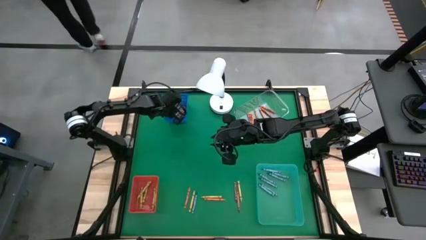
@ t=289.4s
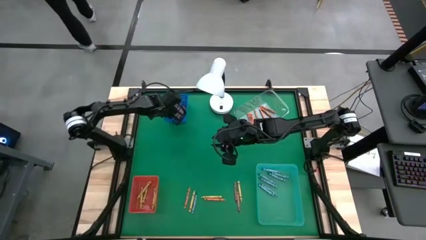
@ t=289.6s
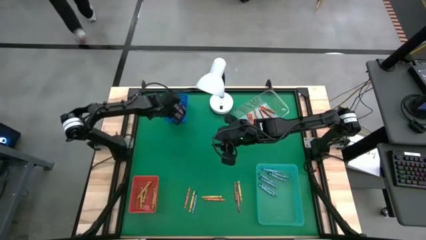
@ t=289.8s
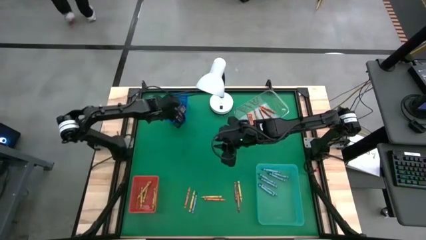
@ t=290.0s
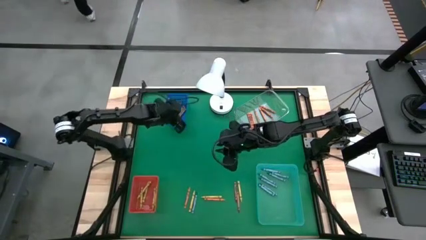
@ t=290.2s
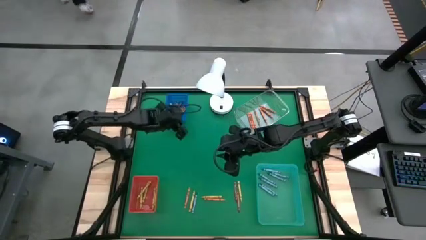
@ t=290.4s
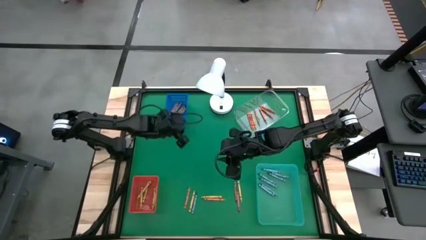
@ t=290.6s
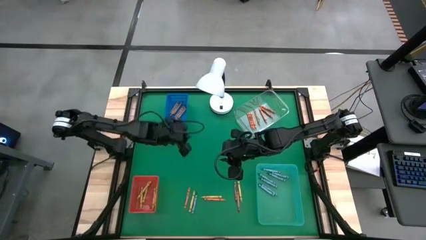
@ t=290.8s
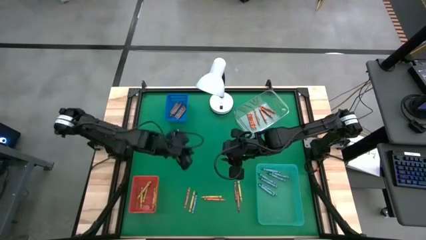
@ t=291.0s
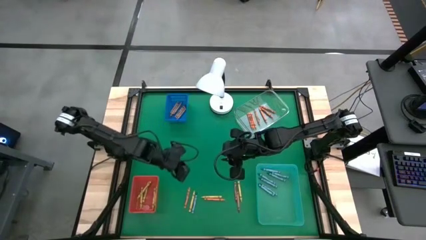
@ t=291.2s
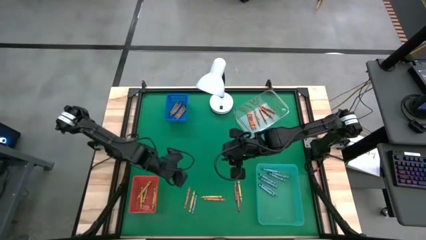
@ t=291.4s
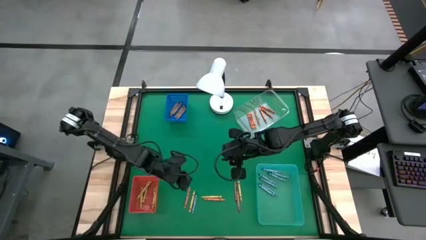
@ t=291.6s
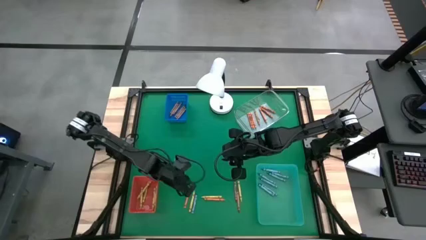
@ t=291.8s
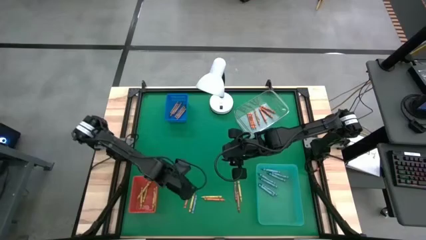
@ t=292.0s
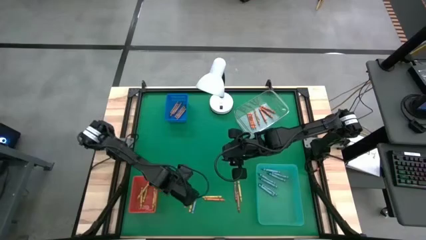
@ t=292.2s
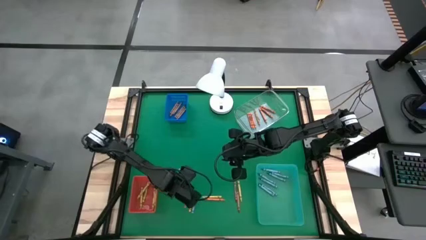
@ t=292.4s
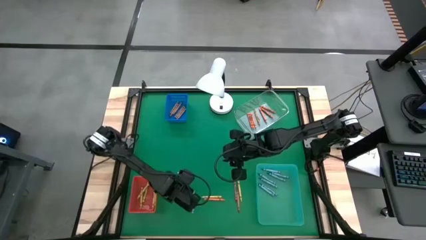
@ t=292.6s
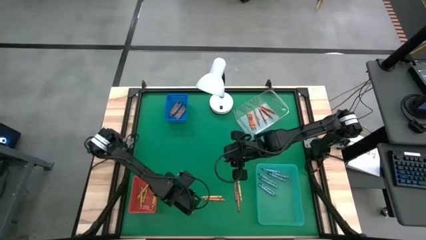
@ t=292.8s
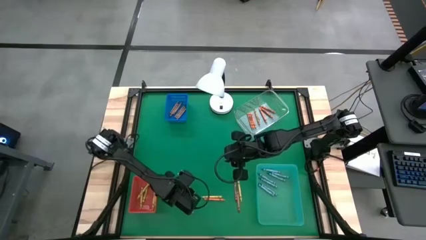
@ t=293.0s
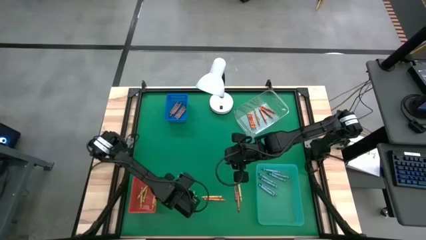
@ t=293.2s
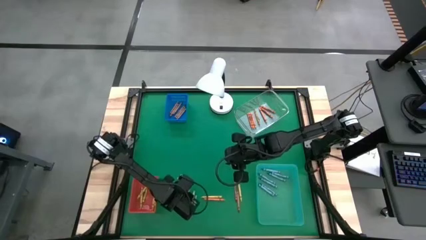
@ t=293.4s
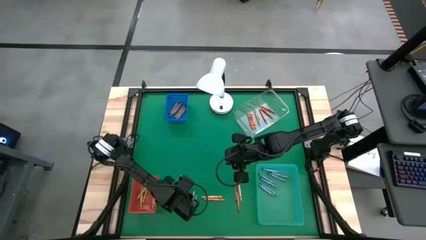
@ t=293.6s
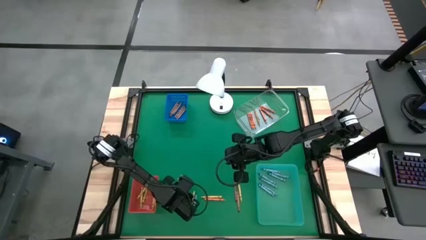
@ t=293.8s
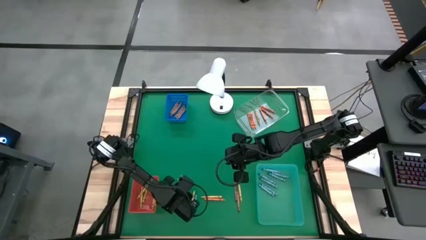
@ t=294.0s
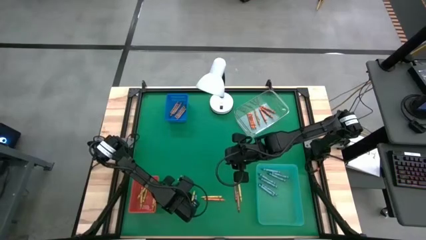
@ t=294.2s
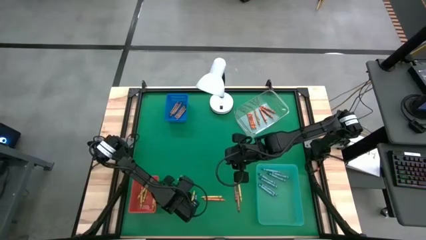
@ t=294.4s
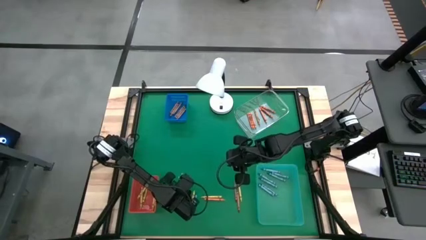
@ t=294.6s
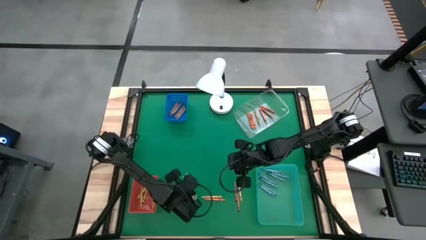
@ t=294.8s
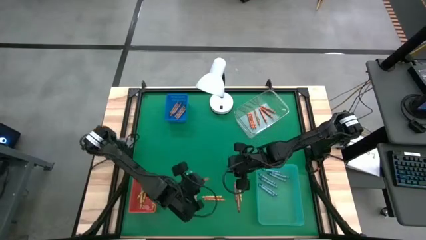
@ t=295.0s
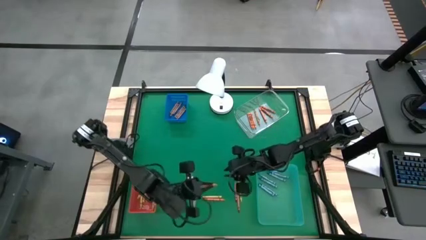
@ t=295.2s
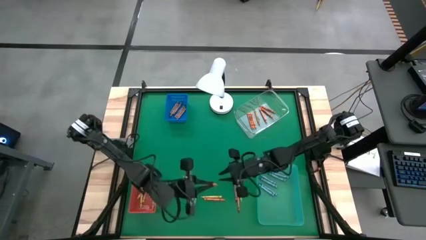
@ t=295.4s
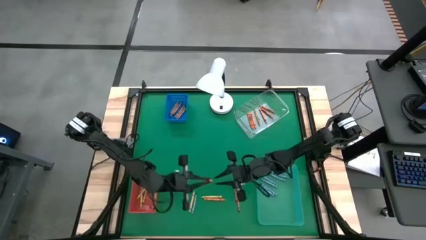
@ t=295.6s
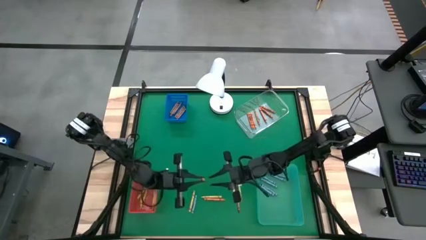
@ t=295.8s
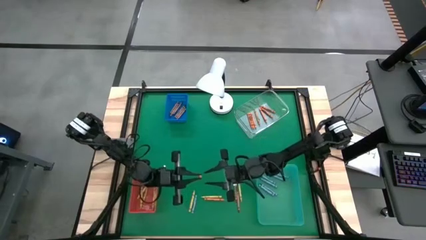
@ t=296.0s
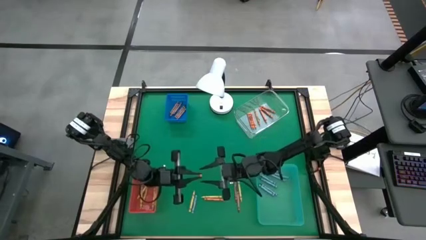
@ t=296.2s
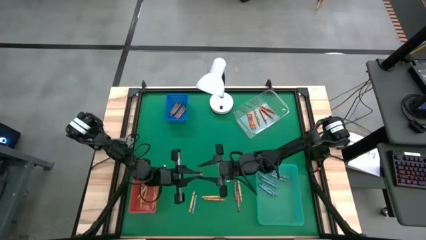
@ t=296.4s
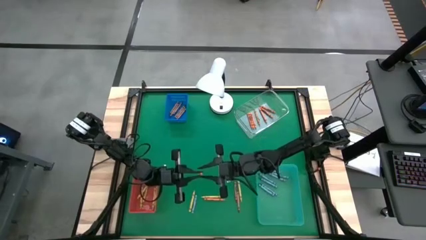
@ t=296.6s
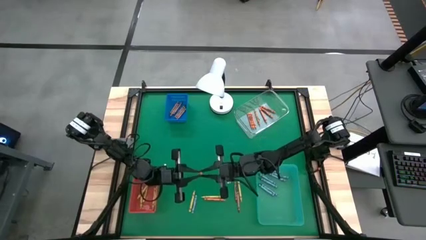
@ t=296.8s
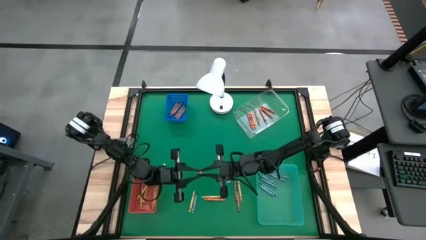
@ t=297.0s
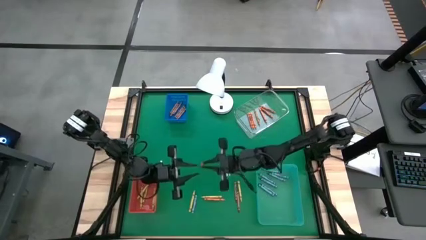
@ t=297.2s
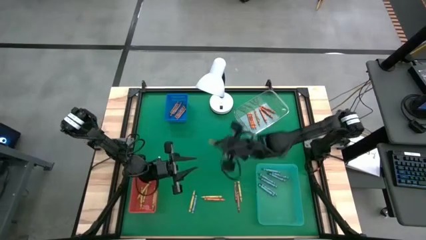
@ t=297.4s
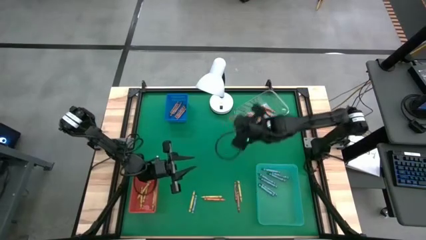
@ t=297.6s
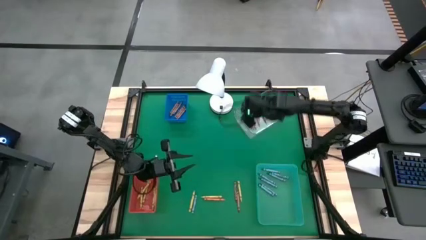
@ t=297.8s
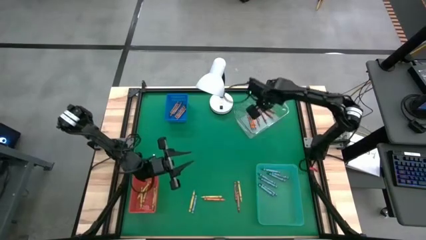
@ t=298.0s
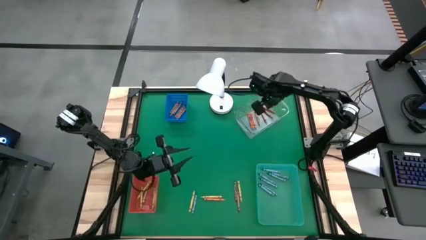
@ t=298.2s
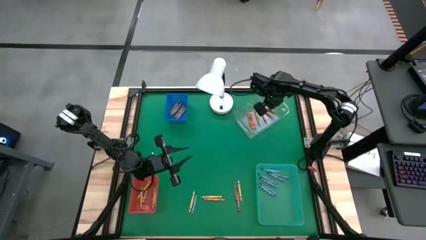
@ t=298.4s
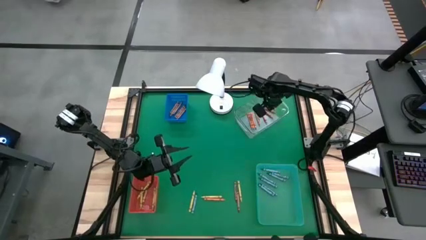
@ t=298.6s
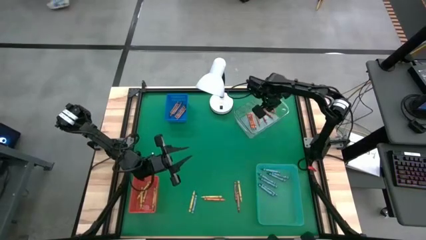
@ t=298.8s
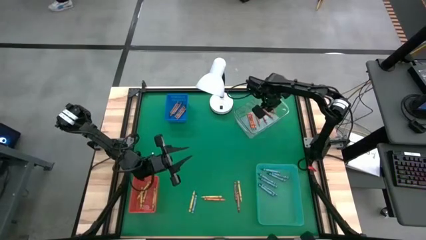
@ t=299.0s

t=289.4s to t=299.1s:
Task: Sort crayons
Put the orange crayon into the transparent bin

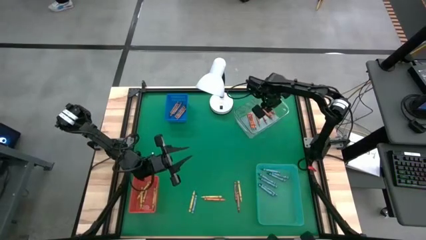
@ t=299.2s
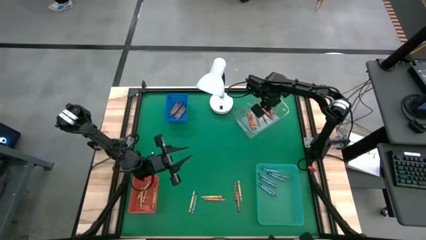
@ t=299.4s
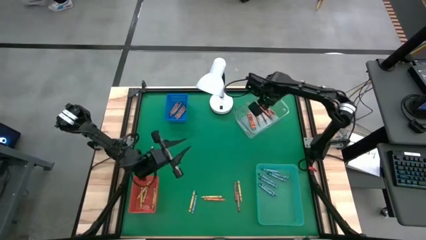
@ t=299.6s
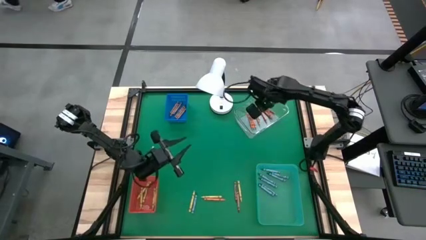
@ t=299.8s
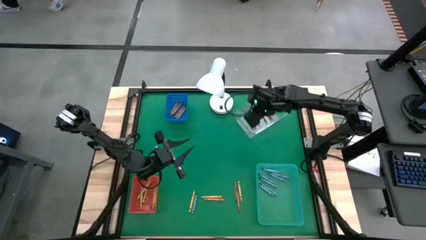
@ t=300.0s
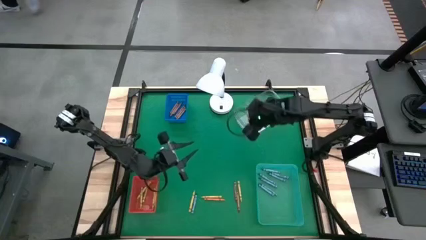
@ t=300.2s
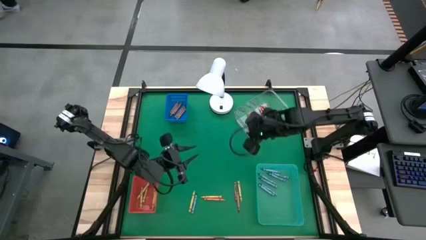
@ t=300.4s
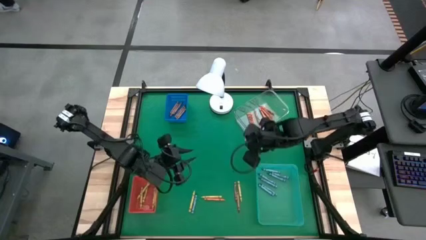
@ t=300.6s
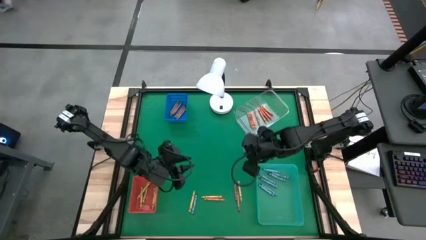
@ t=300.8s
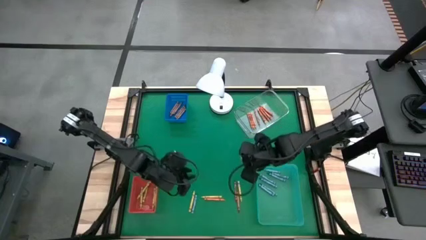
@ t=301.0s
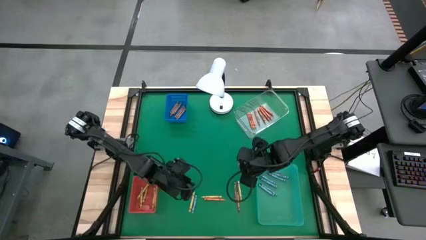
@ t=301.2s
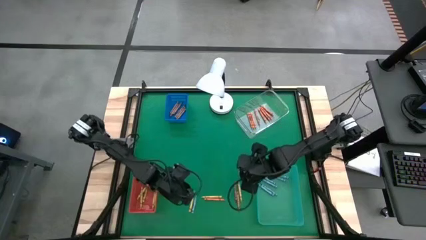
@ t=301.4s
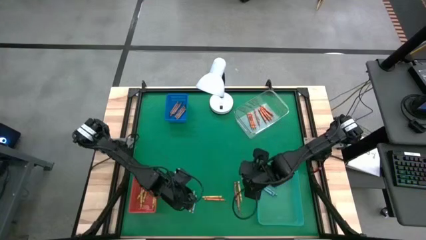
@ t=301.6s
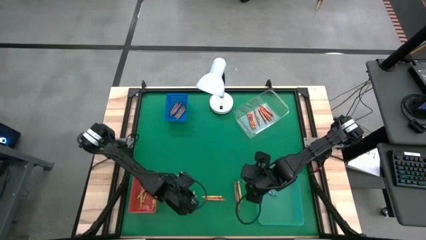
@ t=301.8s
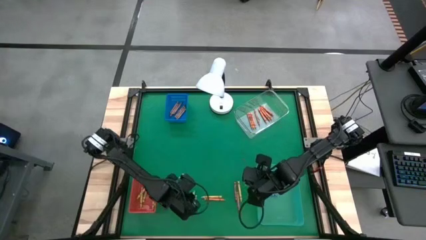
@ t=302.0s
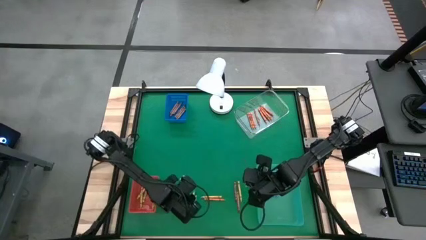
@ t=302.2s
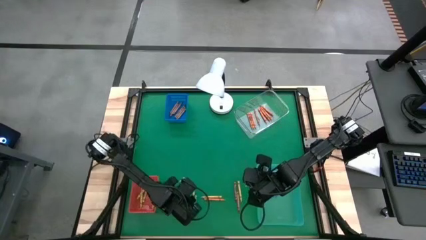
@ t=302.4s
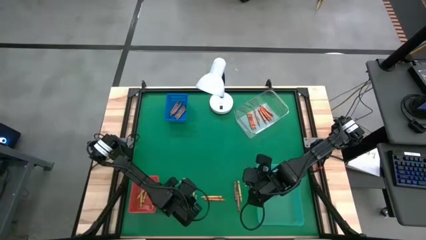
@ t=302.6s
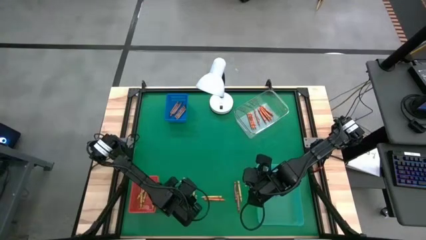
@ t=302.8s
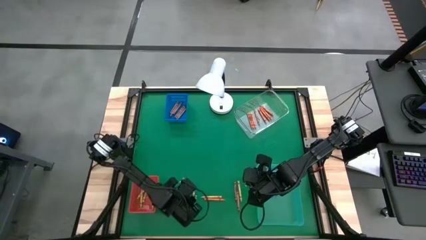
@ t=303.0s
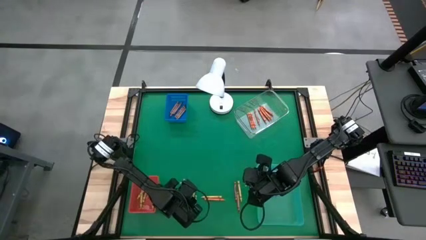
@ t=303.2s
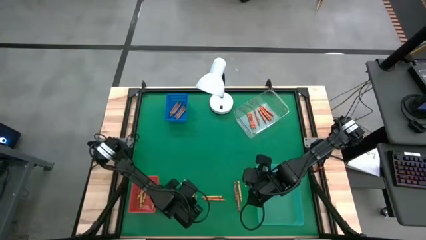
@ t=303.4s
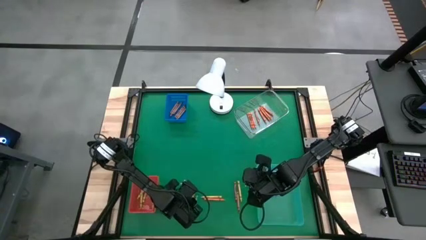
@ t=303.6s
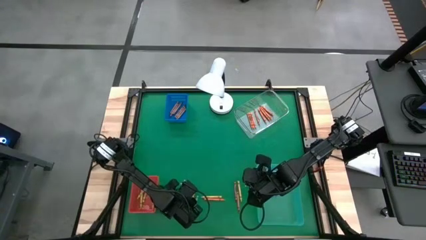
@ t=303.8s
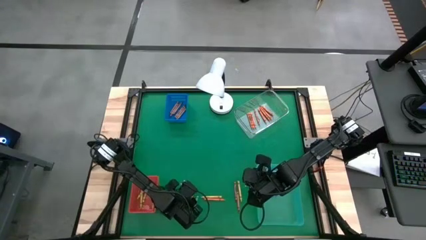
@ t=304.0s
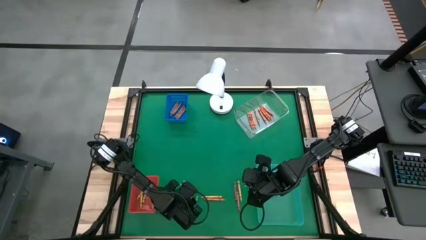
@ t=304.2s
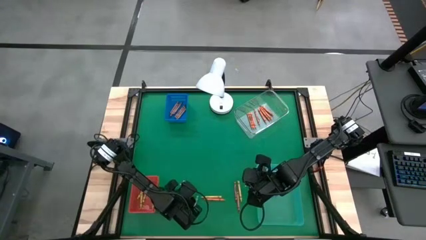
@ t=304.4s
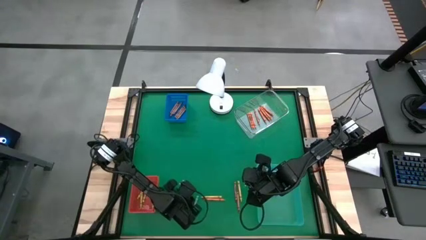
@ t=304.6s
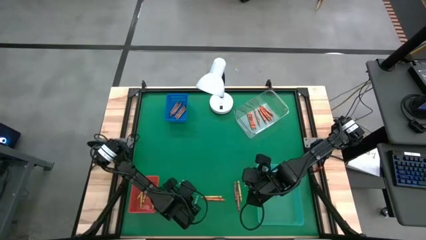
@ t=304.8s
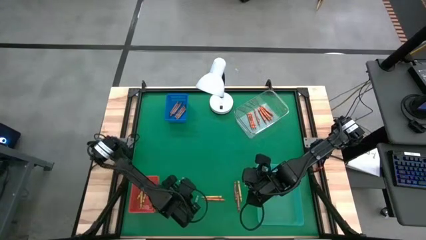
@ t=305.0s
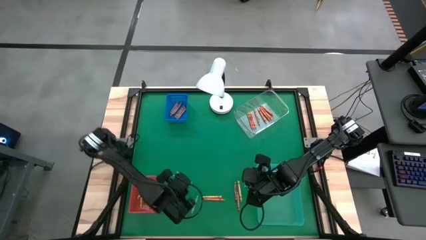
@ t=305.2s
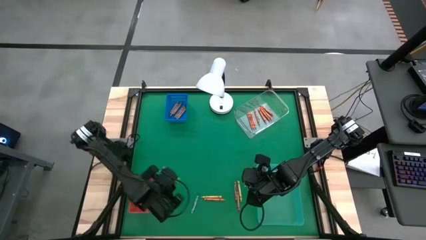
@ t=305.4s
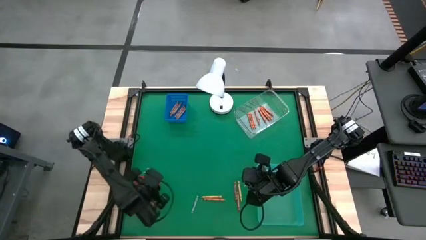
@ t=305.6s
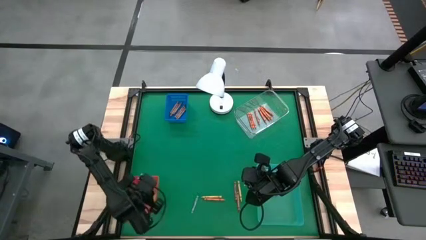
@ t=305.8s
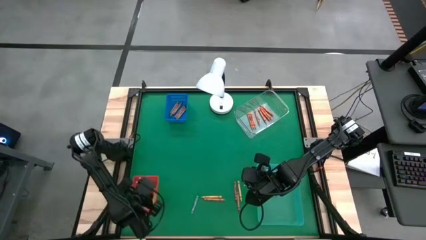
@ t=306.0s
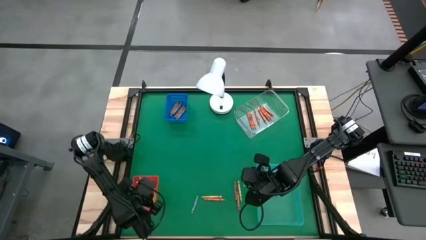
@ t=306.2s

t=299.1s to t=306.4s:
Put the yellow crayon into the red bin
